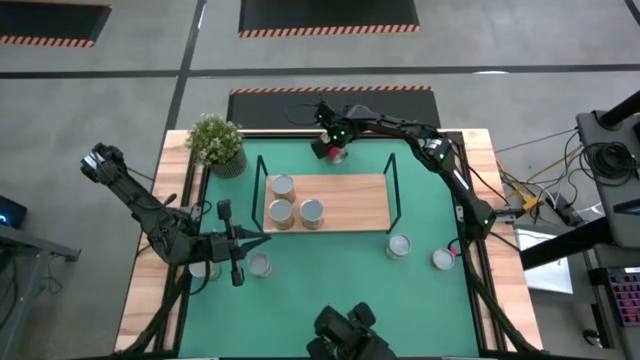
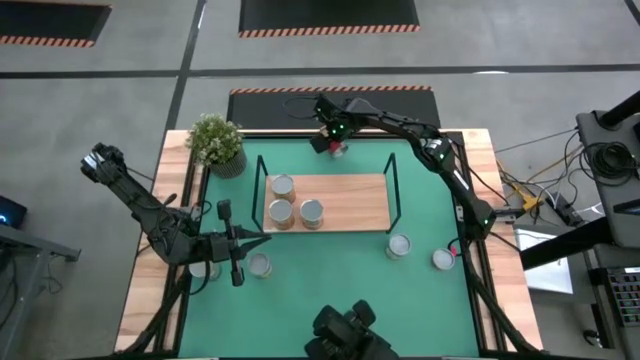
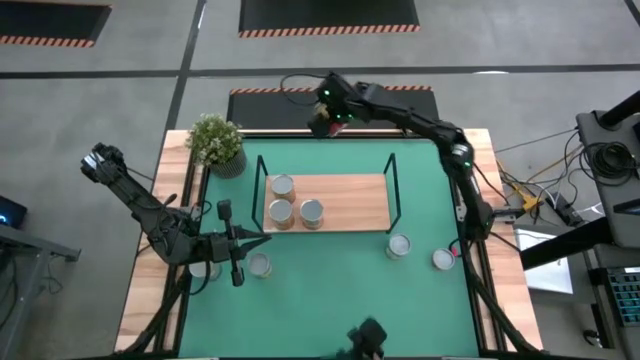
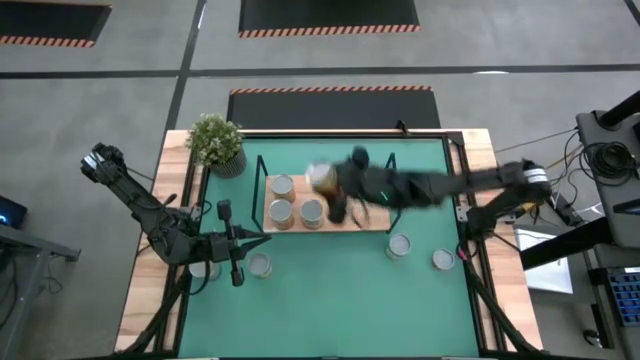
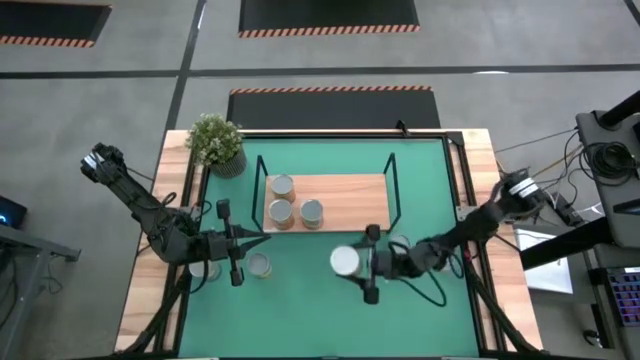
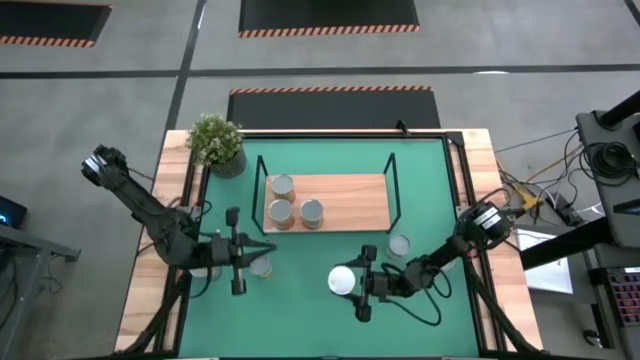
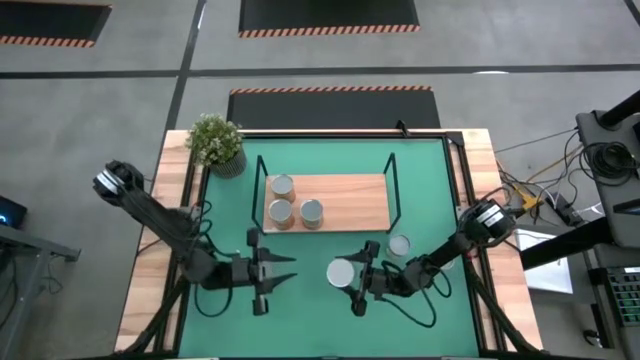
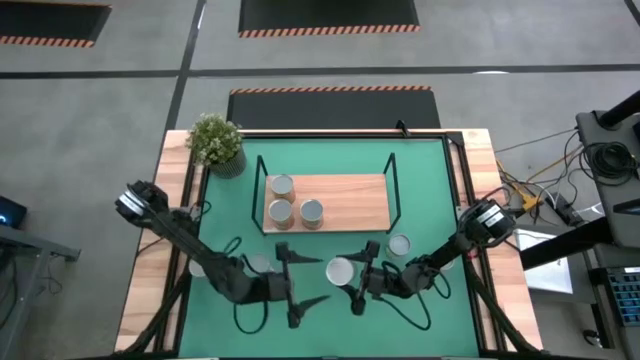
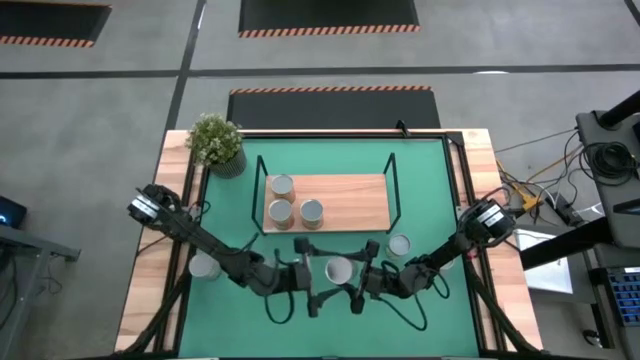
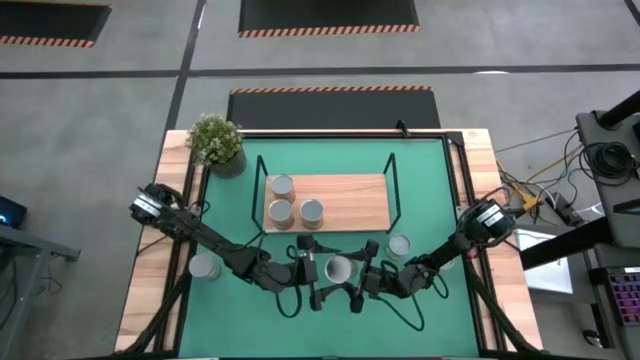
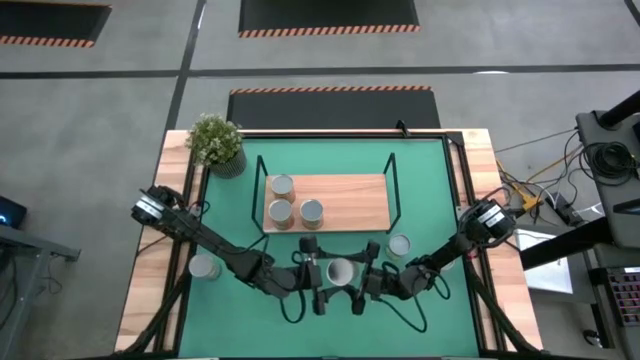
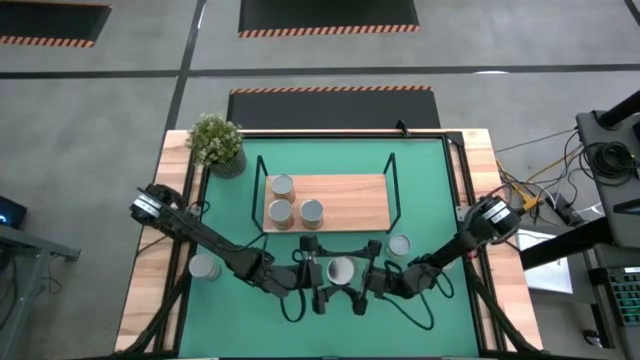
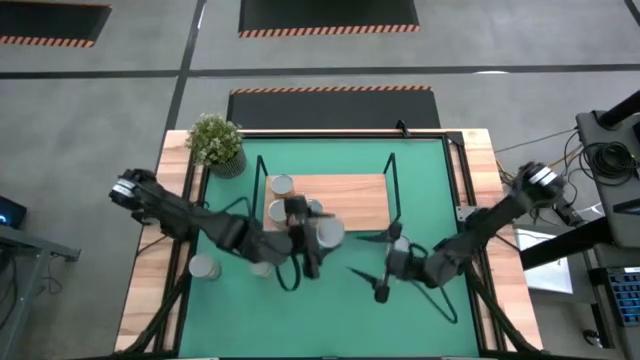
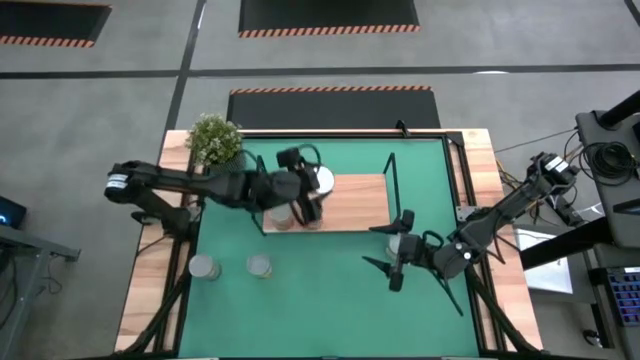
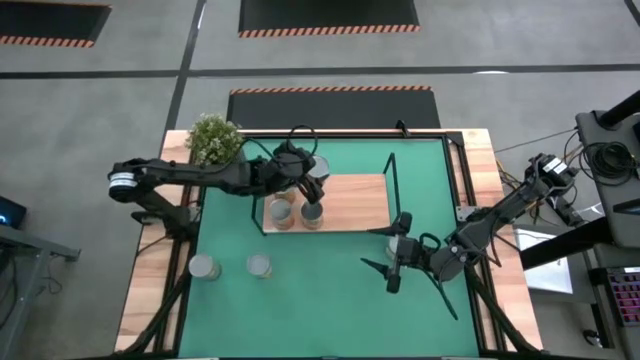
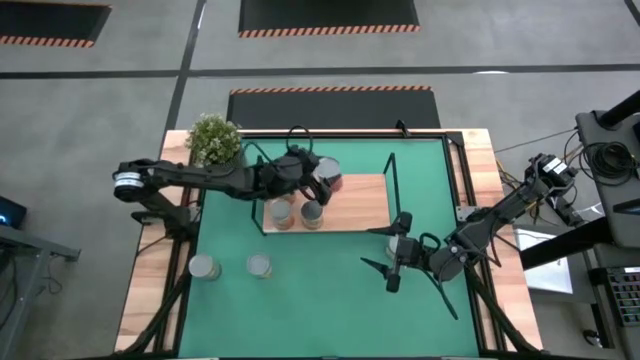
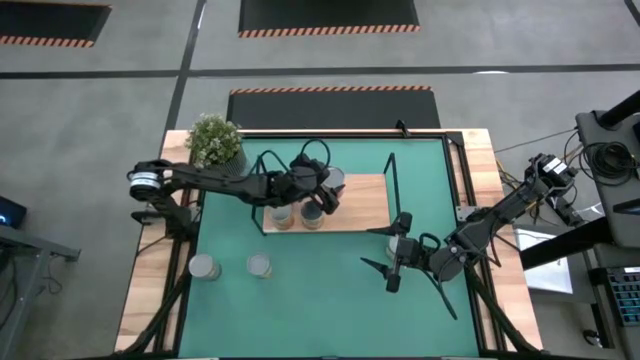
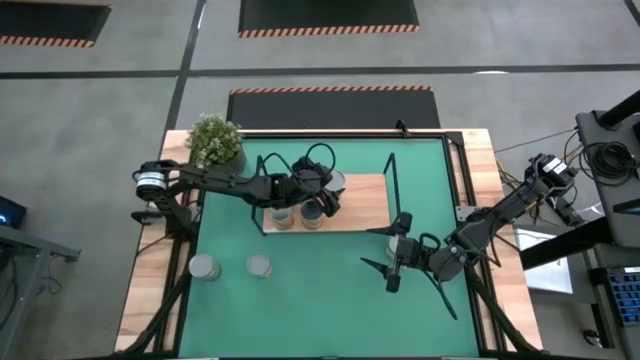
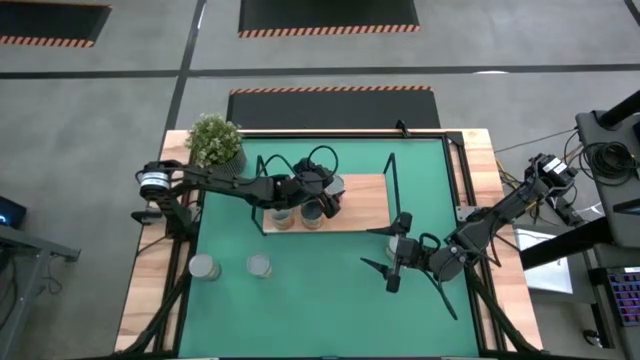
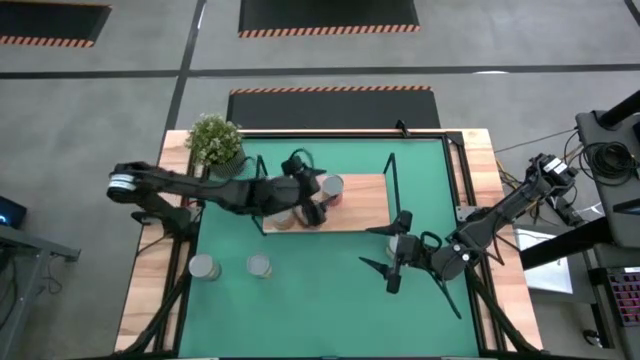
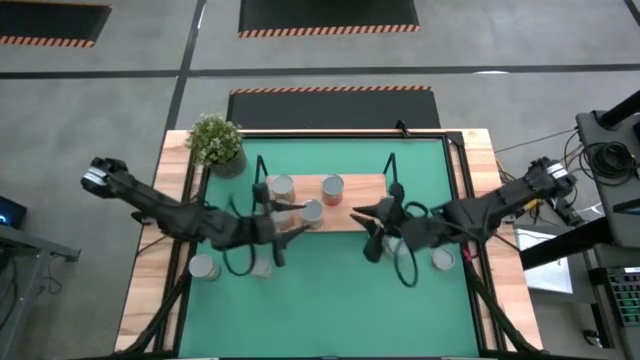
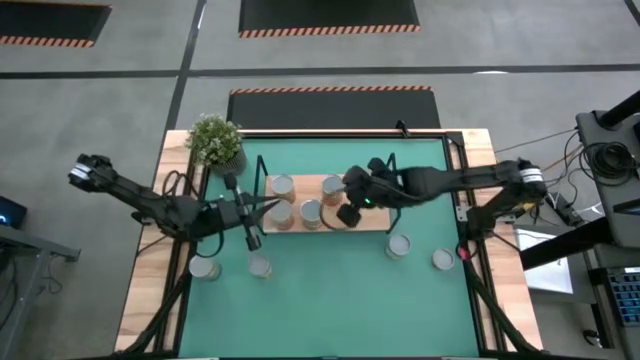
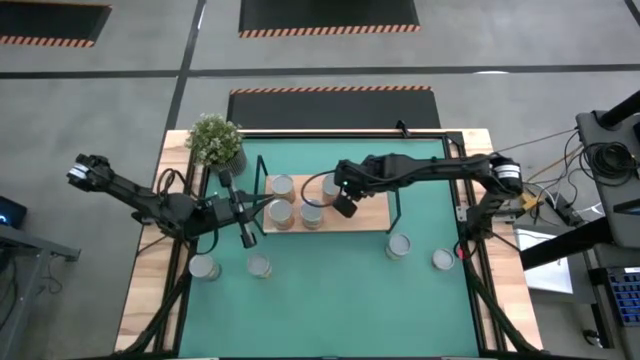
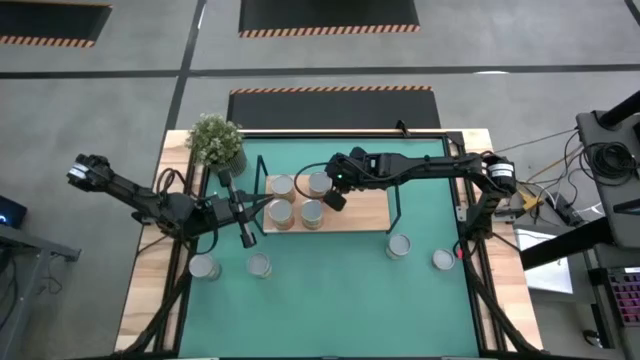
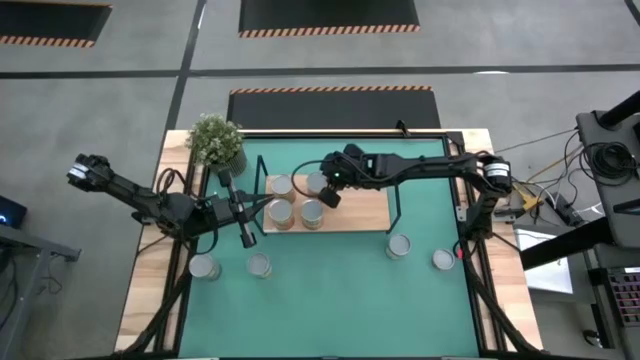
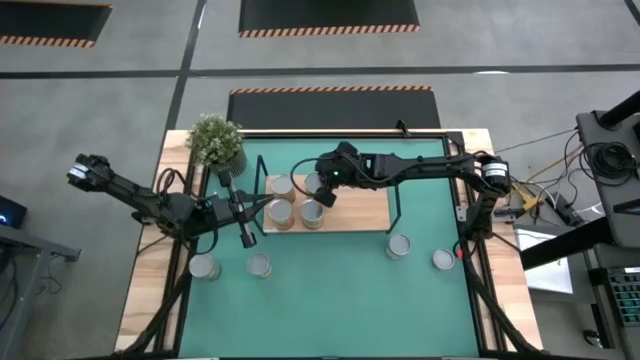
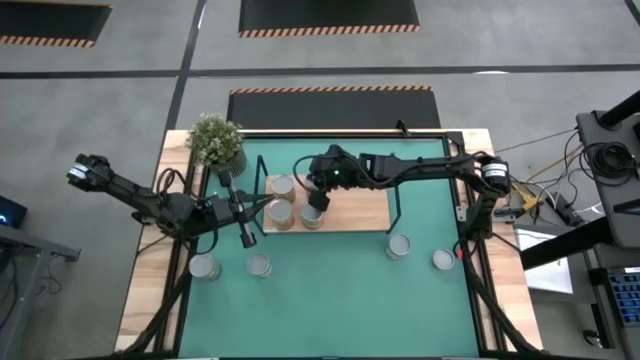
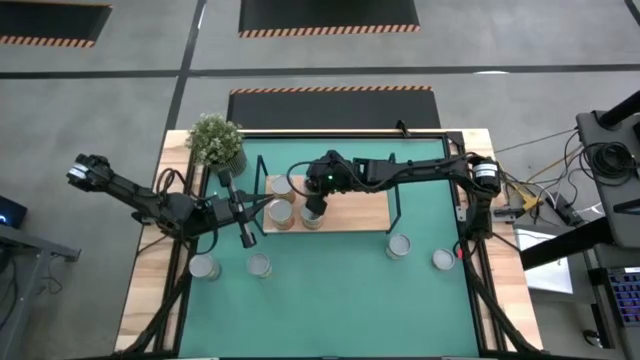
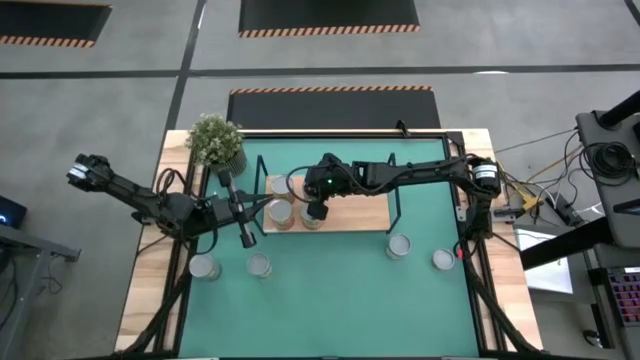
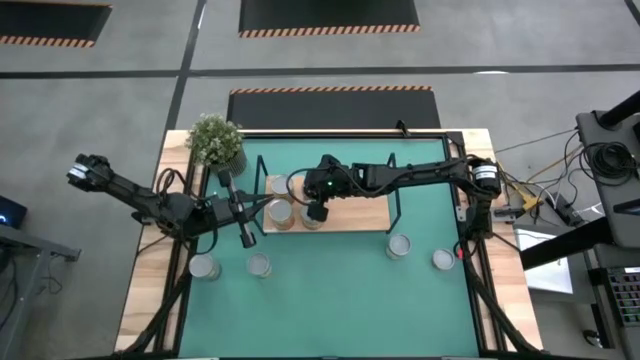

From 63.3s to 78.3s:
Task: Pick and place cans onto a shelf
Put the canned pineapple on the shelf

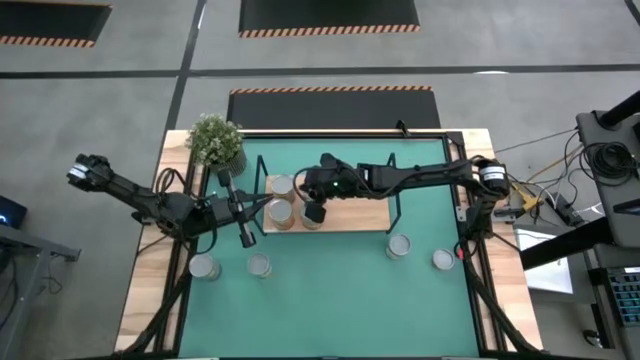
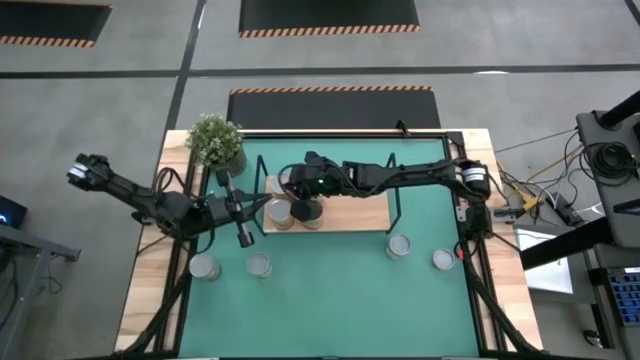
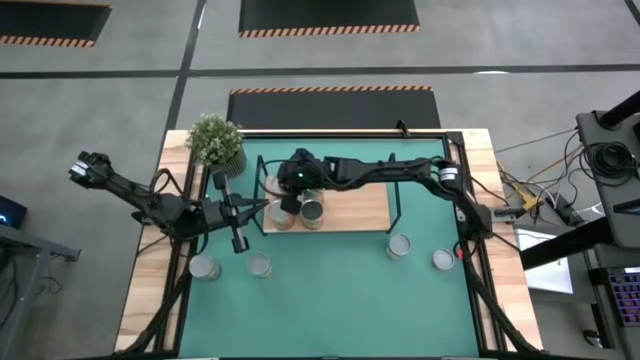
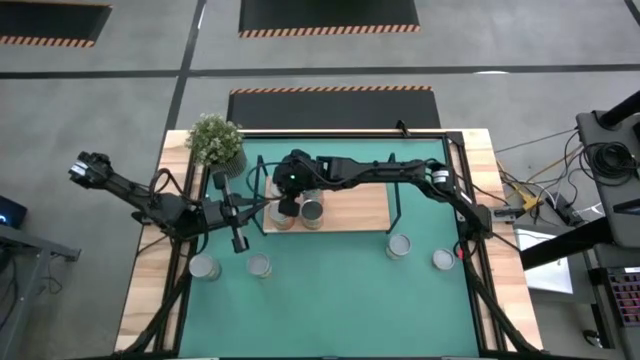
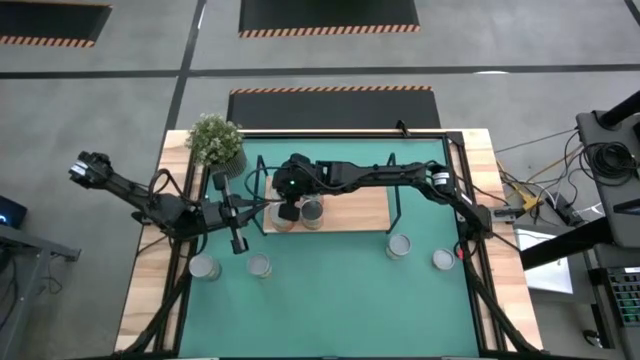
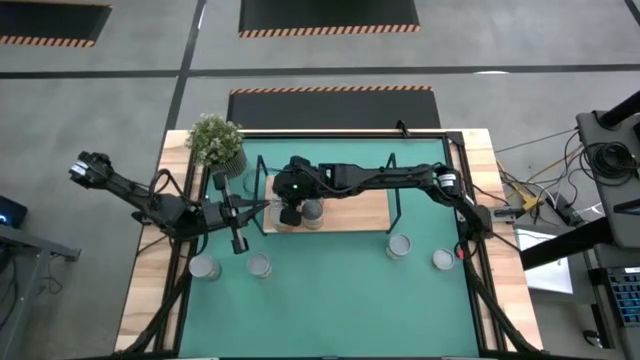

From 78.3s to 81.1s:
Adjust the cans on the shelf

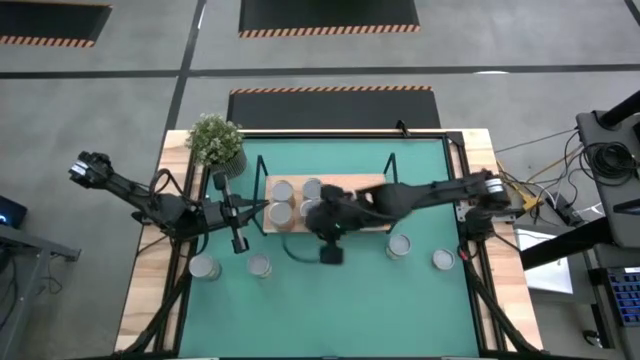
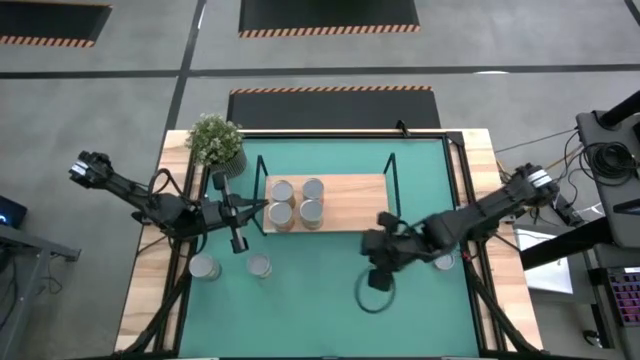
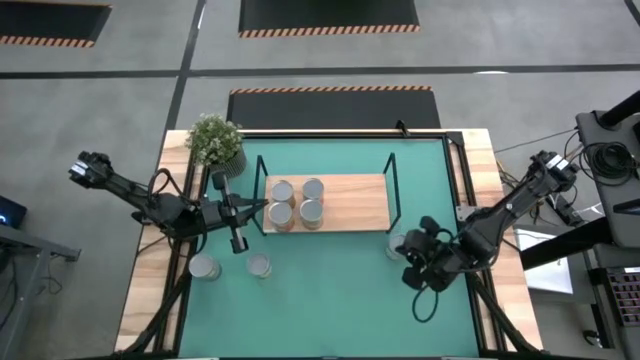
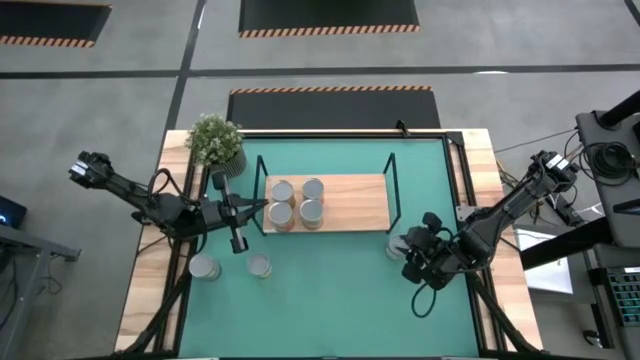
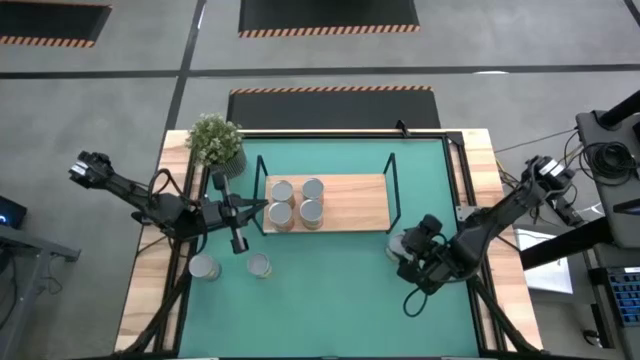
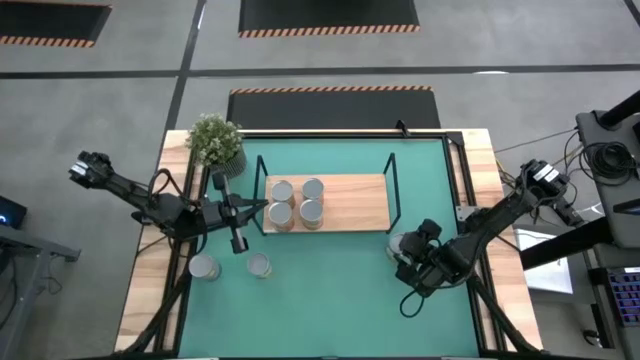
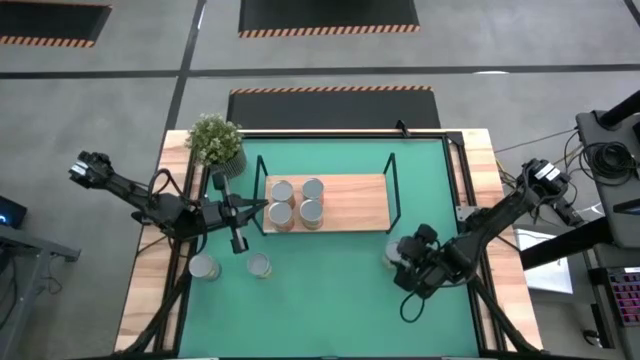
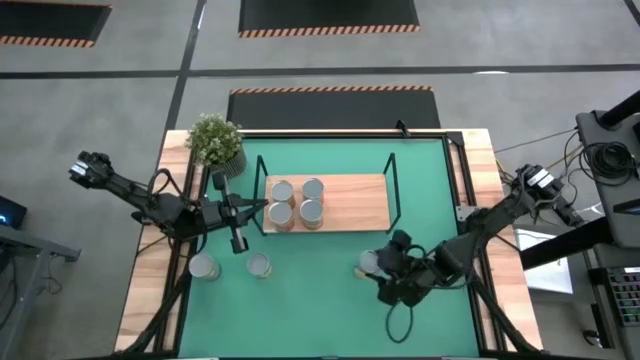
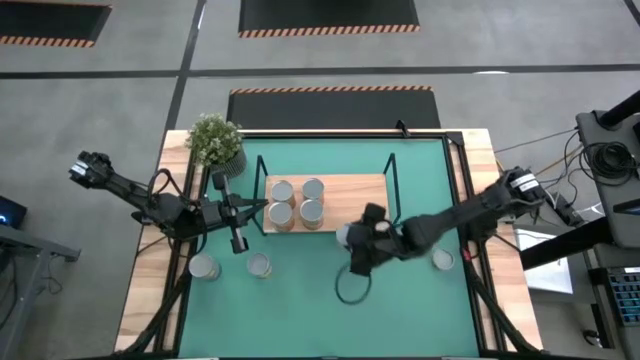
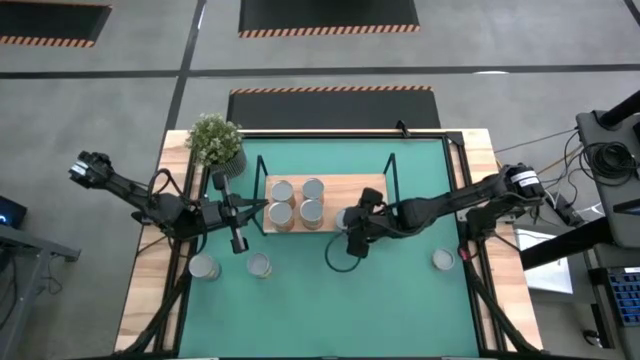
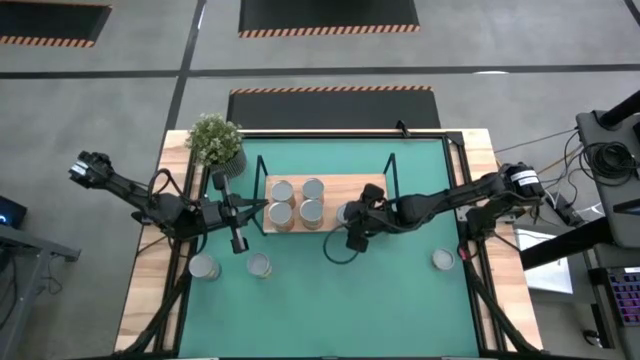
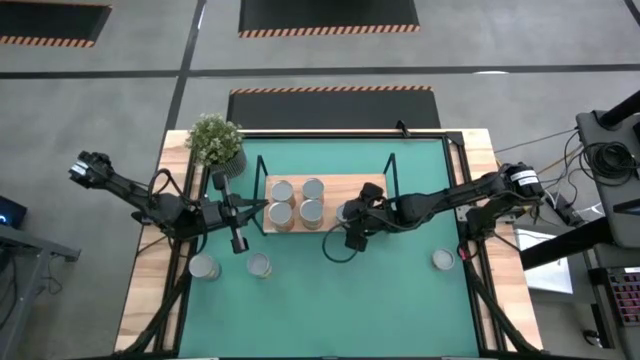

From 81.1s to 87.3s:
Put the canned chicken soup on the shelf
